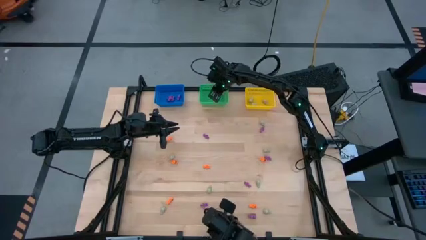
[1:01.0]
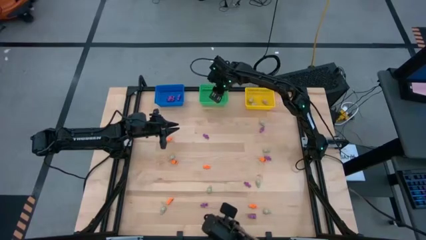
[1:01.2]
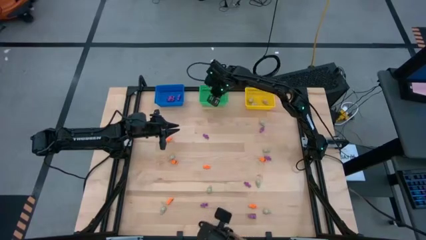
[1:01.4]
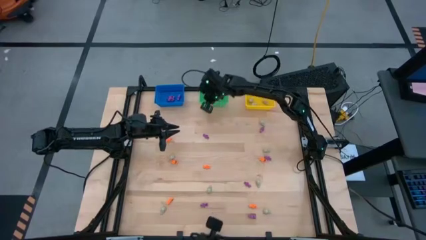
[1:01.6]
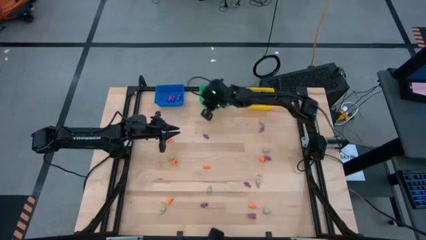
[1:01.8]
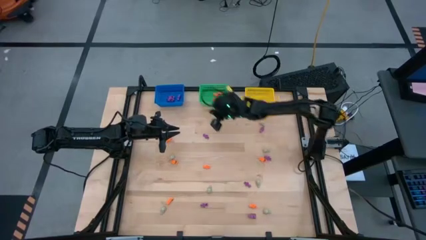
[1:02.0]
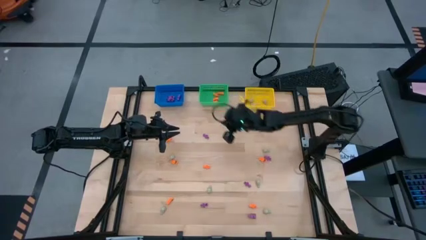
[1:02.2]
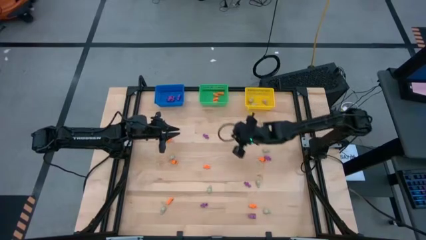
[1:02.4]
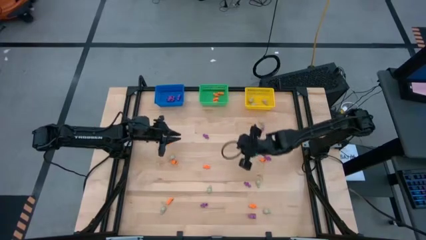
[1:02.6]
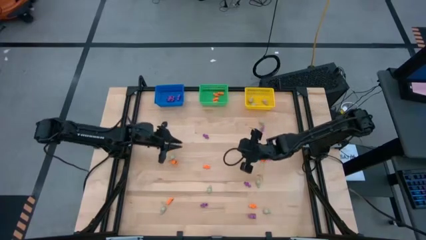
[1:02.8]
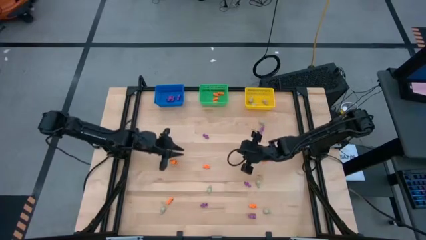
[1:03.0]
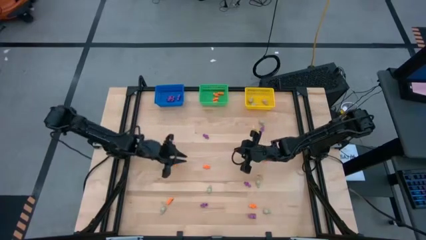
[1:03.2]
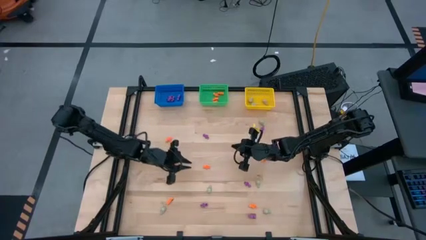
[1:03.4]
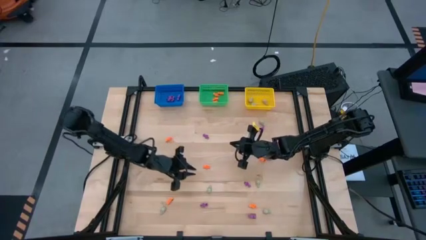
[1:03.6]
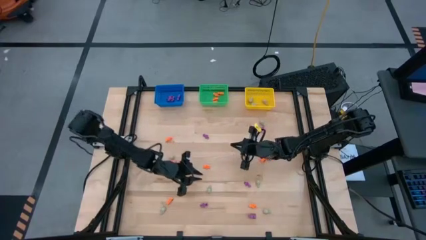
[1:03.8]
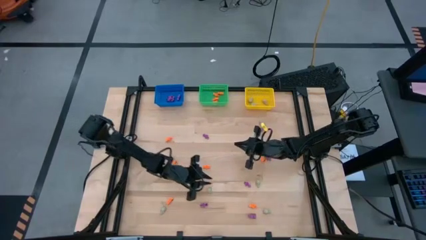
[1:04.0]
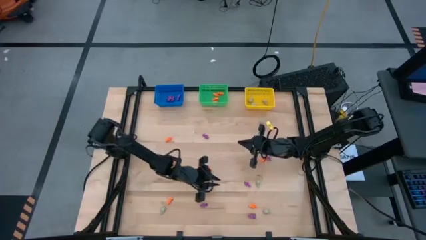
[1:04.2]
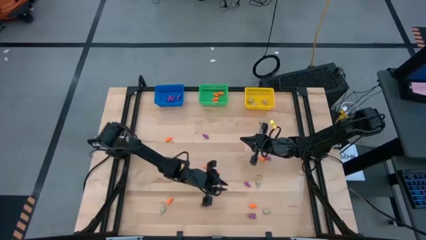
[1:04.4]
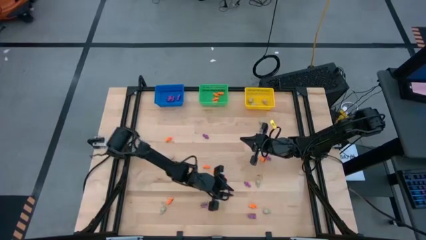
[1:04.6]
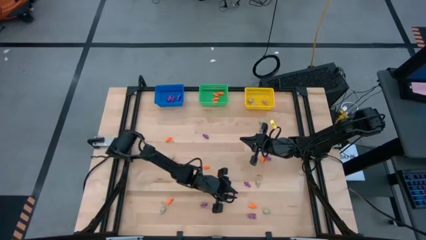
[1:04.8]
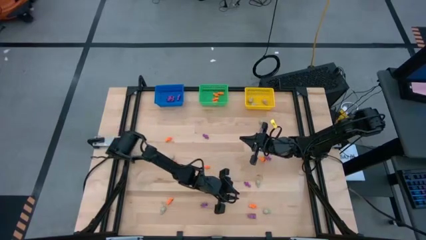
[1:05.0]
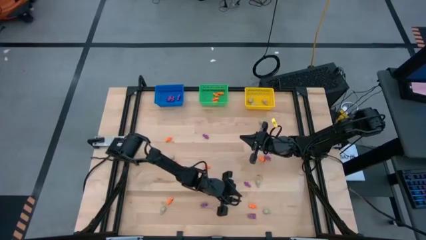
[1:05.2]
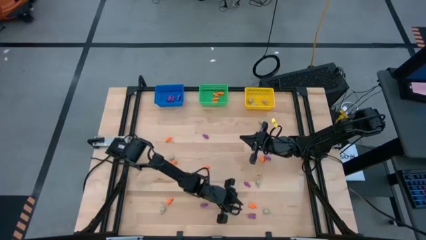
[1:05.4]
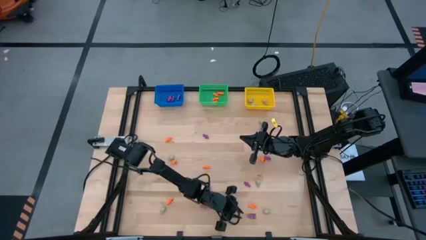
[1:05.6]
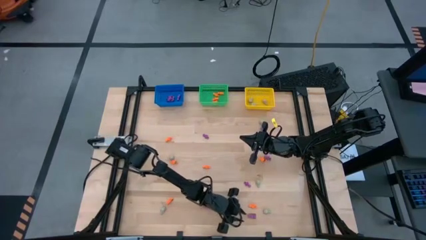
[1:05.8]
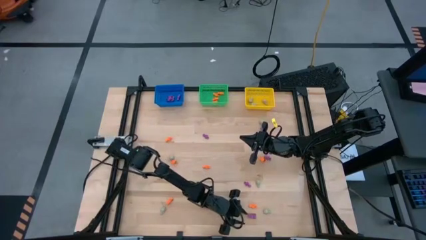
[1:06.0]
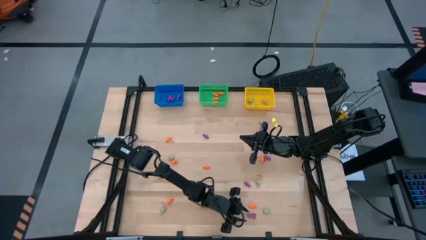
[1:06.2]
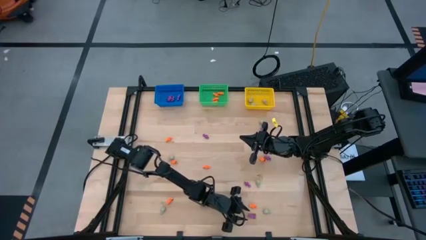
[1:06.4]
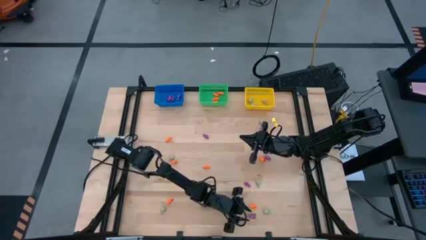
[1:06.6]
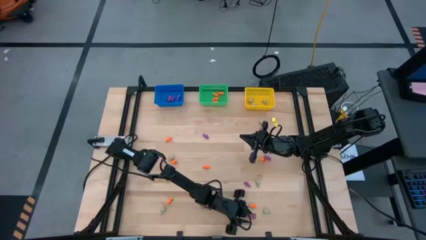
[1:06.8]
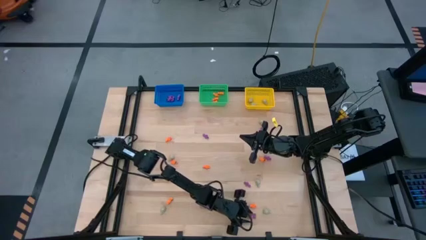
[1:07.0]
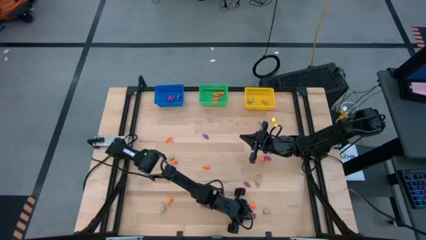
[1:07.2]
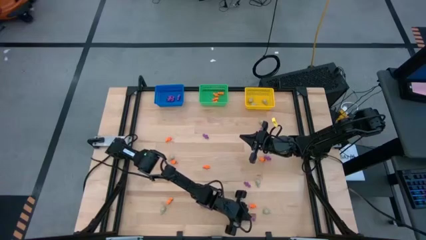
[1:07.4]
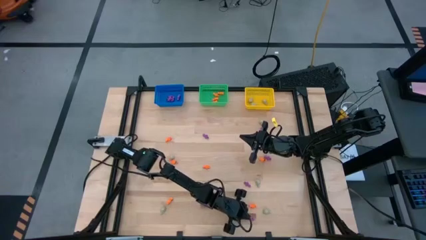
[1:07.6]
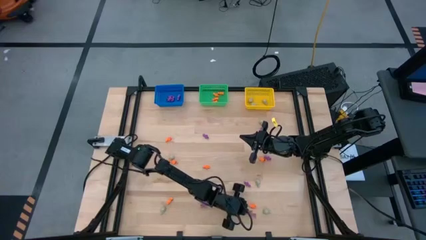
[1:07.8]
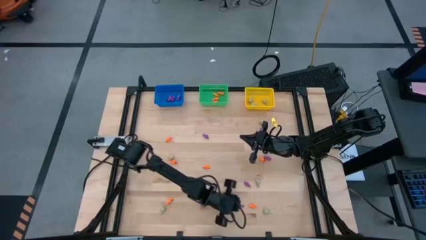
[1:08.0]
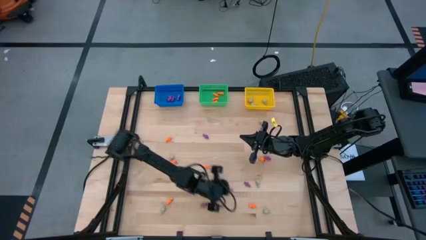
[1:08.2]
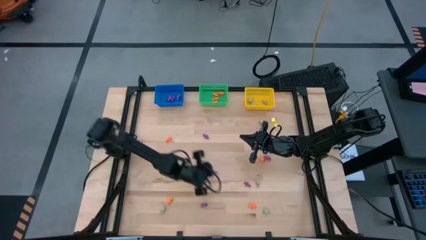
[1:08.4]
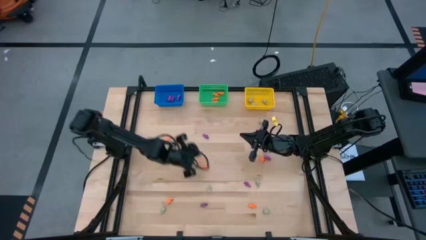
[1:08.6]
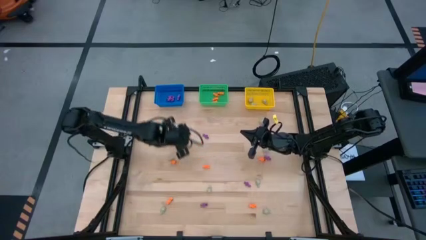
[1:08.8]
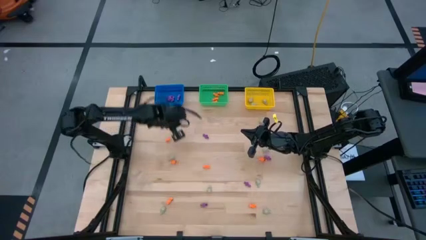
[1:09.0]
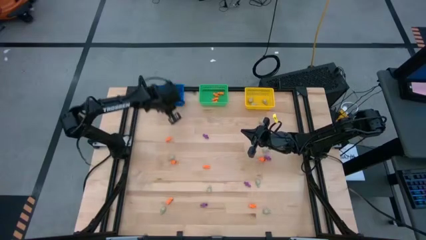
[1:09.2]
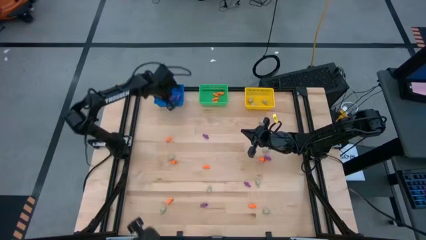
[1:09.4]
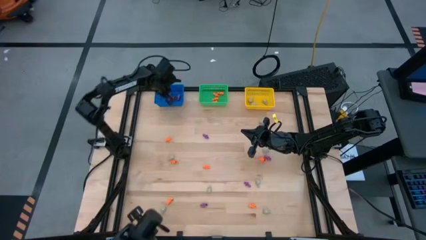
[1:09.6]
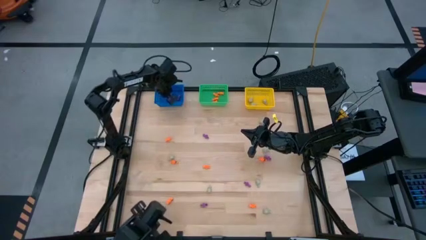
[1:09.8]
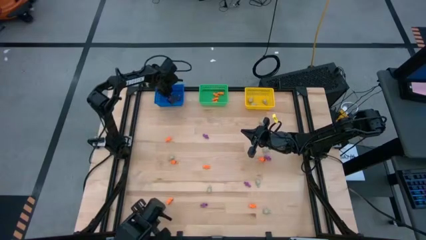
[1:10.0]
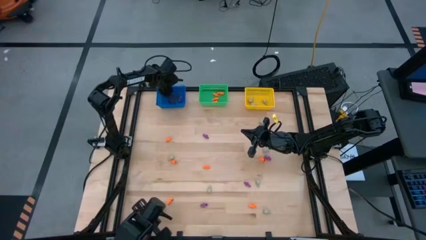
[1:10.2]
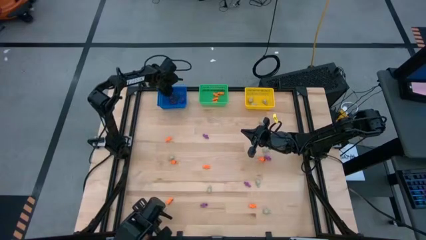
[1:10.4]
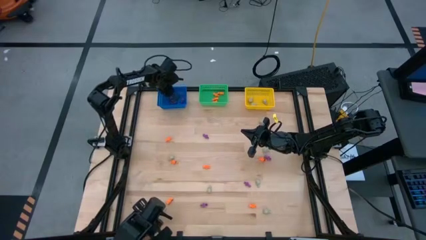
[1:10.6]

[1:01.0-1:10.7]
Task: Sort Halloween decoration
Put the purple skeleton toy into the blue basket

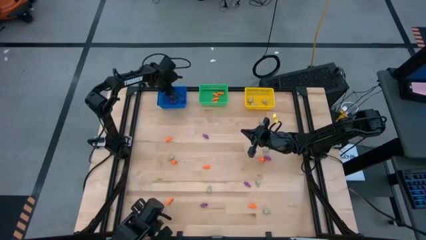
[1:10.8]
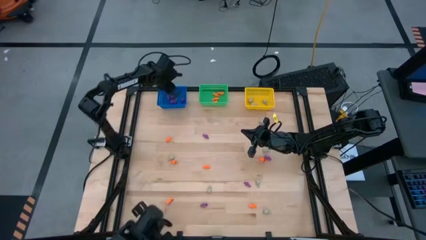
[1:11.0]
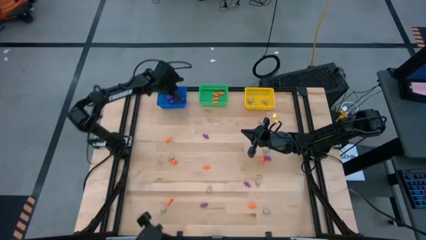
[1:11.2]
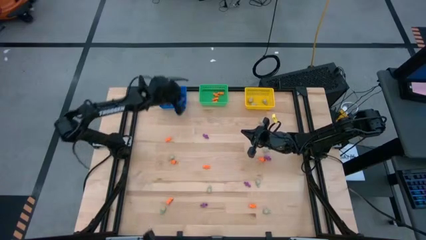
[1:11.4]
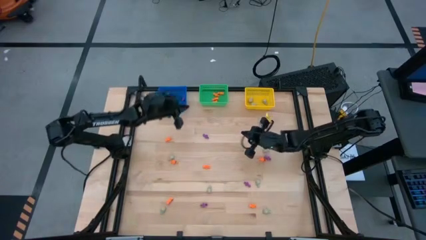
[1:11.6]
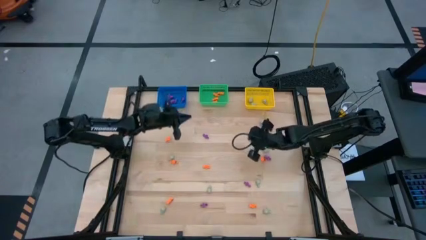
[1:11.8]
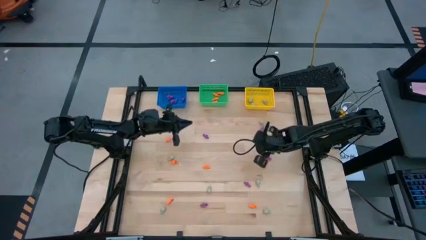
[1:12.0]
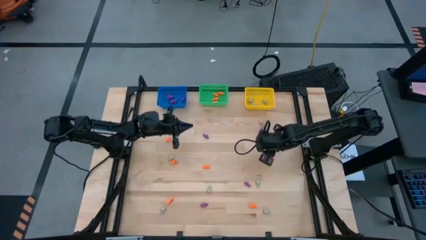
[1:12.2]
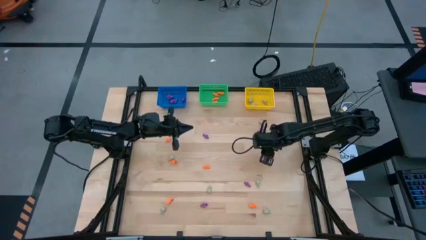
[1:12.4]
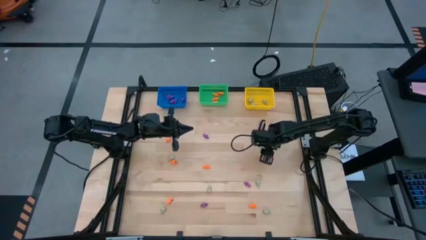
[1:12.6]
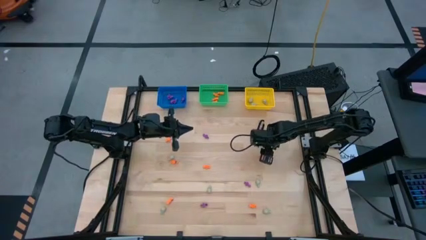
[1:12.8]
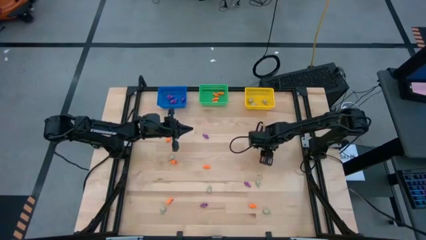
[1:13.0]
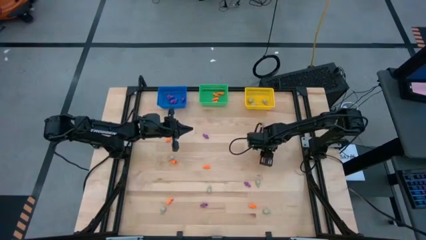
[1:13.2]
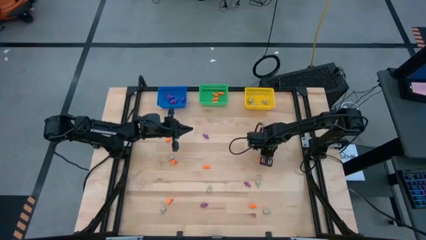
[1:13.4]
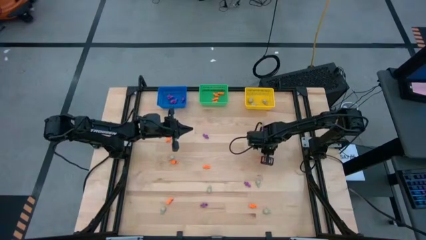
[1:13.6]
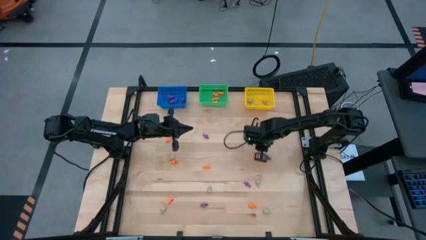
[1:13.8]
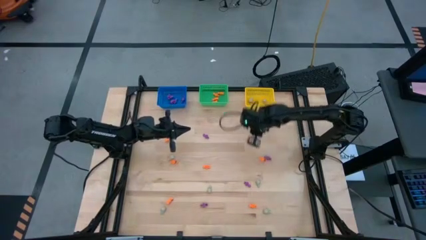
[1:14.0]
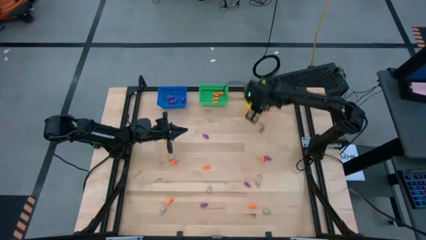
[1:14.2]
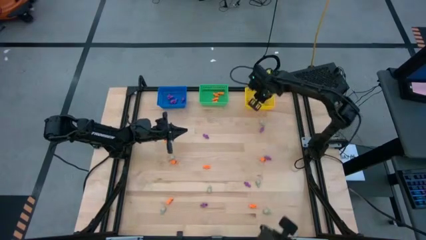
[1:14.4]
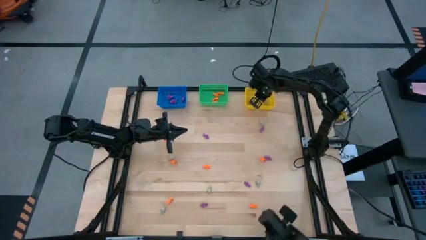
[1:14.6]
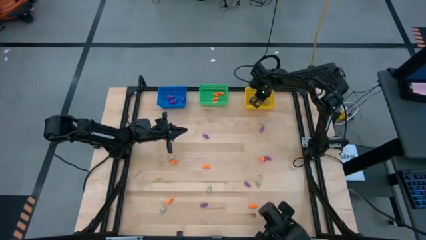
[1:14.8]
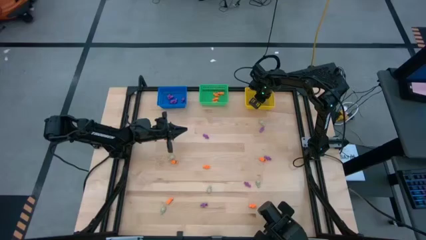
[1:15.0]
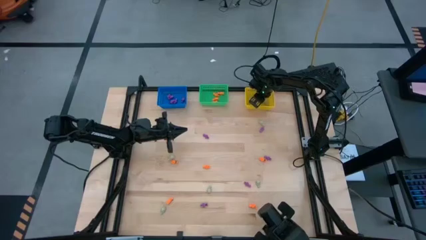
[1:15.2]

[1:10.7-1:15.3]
Put the grey skull toy into the yellow basket

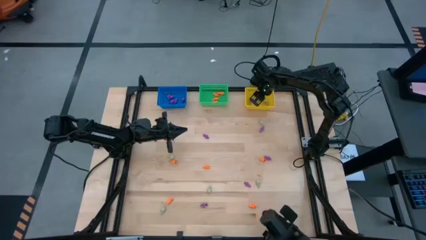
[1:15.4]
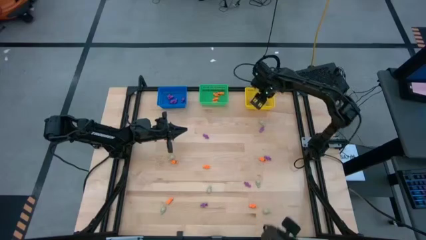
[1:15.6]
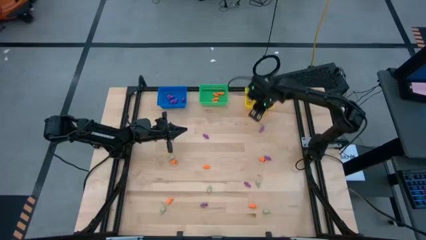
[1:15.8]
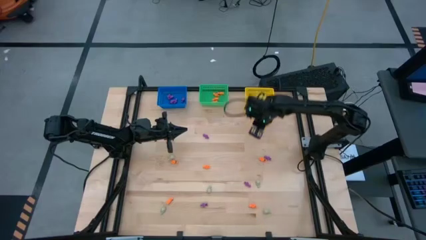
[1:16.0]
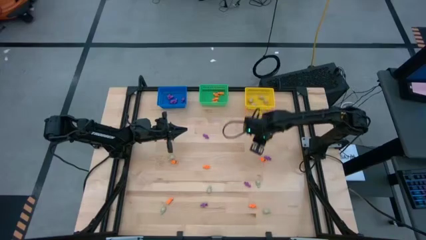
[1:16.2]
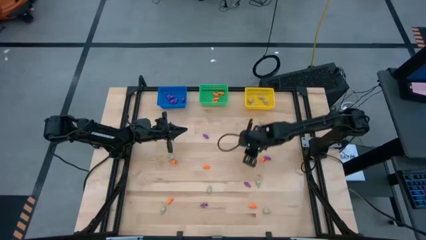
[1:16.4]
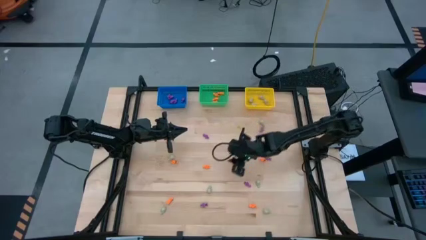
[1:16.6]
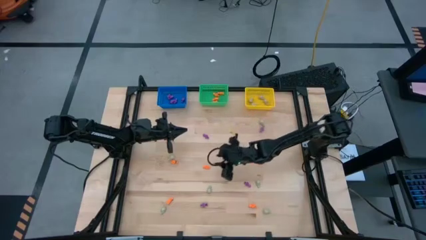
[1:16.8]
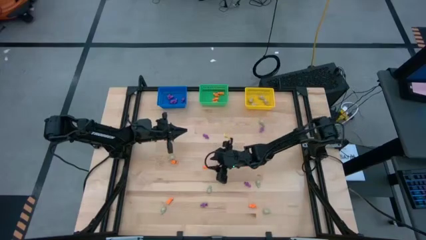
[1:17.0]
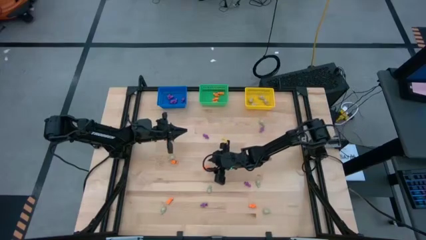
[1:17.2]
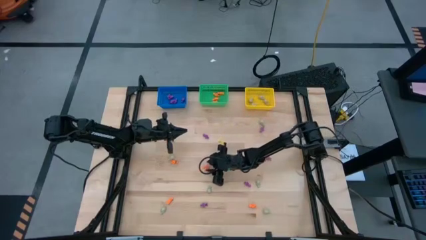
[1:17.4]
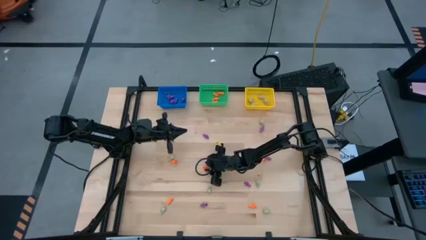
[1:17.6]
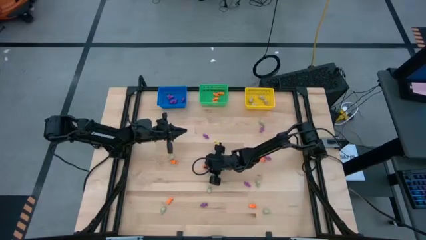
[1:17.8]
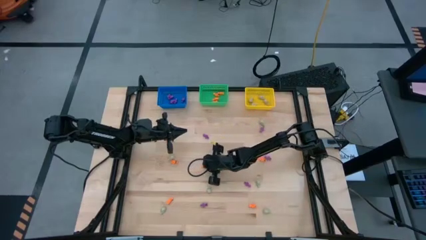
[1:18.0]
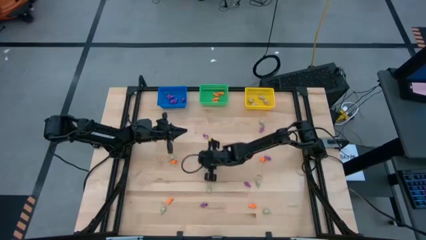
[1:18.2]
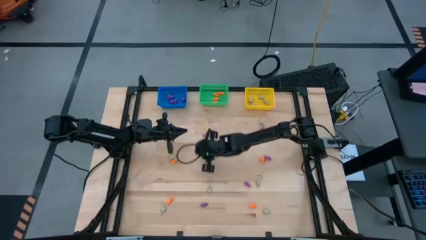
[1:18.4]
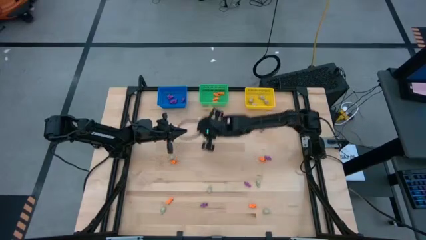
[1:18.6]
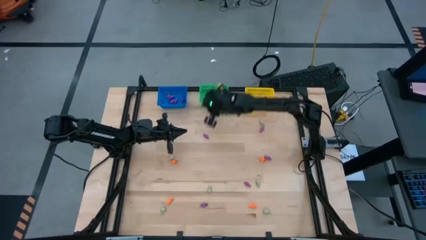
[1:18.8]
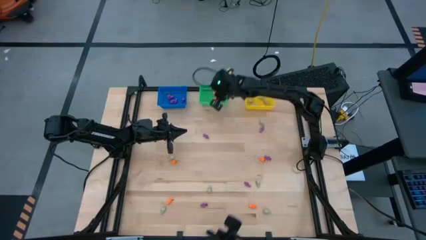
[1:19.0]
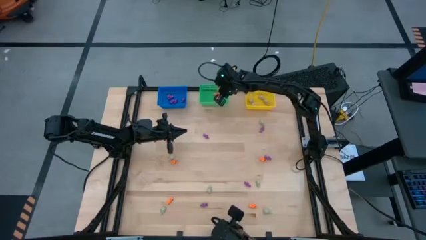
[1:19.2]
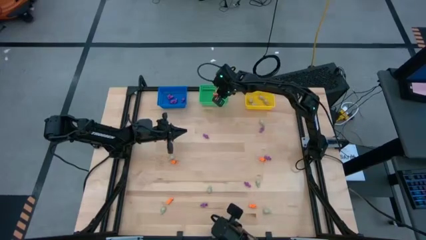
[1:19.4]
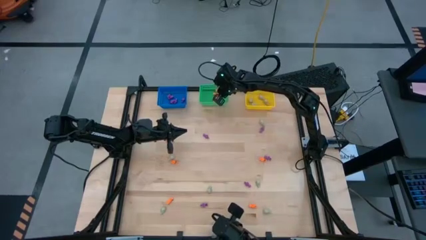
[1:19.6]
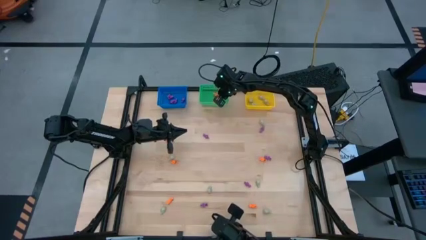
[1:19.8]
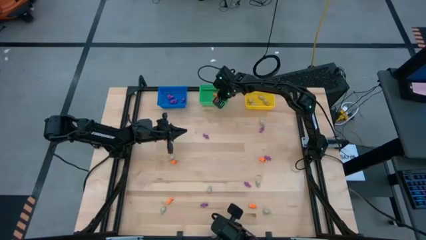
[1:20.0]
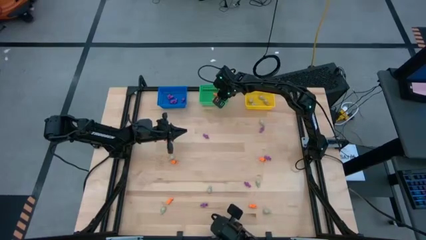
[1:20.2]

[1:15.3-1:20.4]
Put the orange skeleton toy into the green basket
